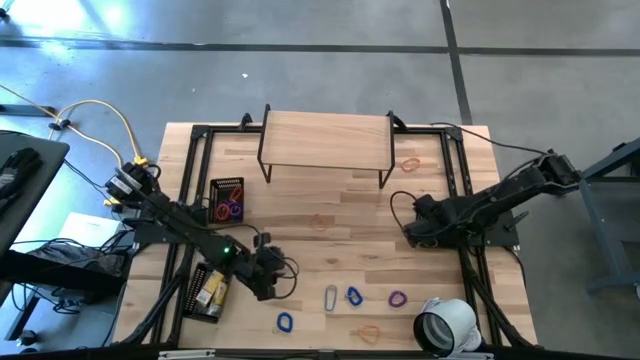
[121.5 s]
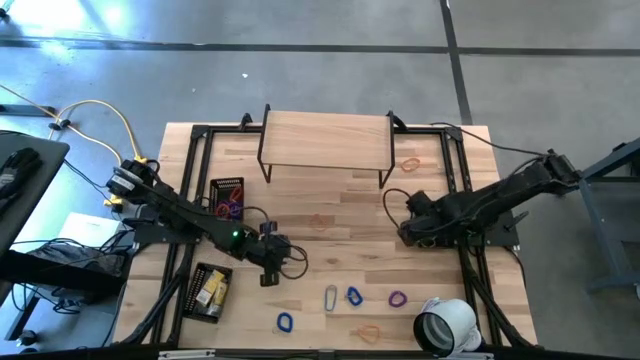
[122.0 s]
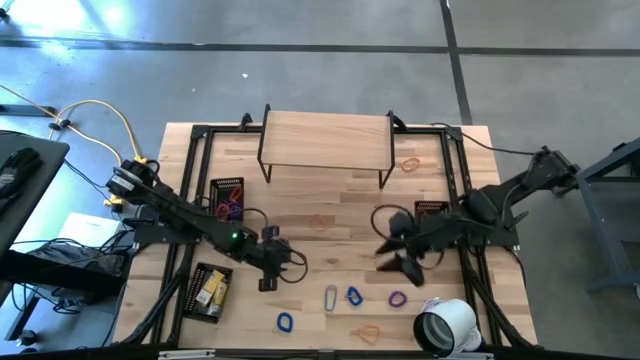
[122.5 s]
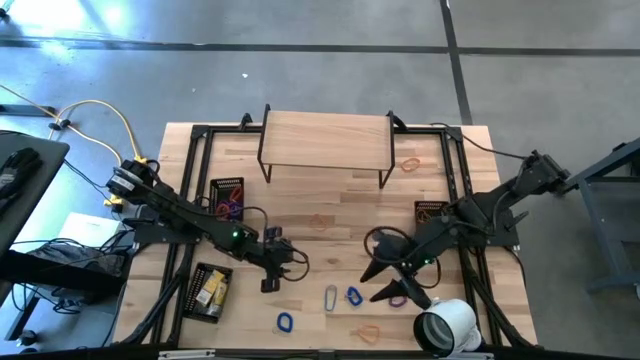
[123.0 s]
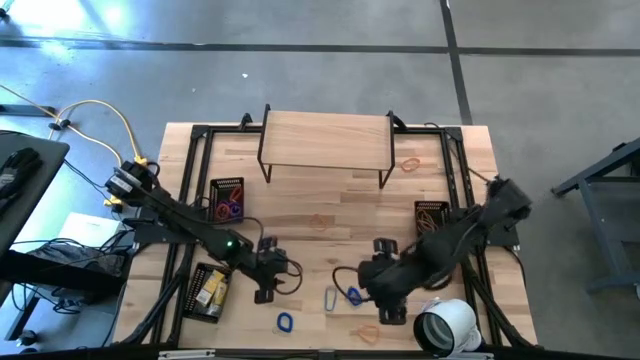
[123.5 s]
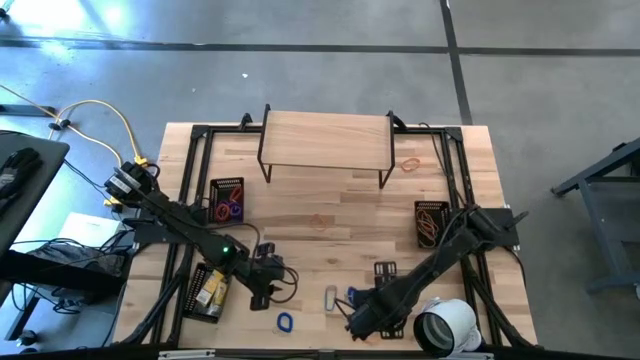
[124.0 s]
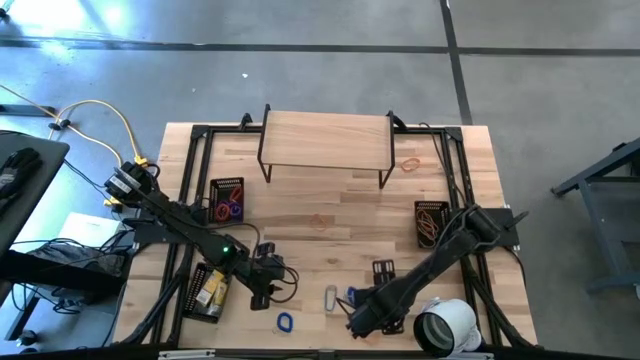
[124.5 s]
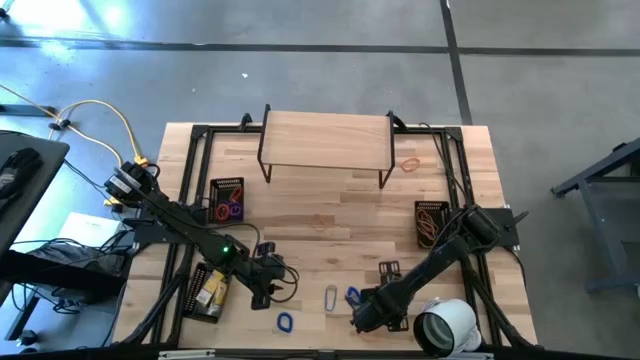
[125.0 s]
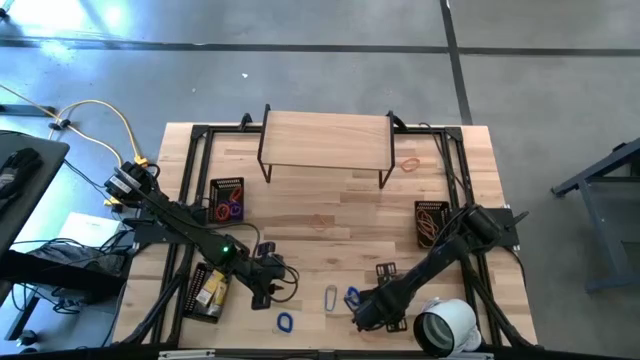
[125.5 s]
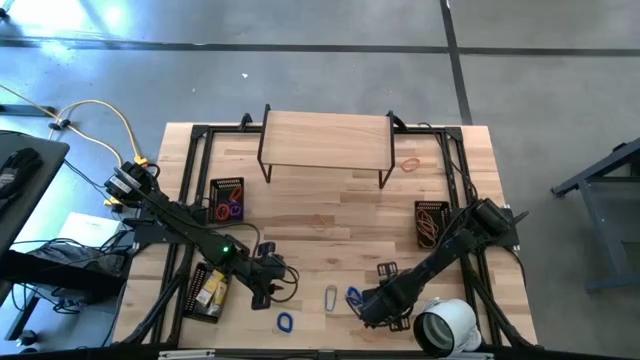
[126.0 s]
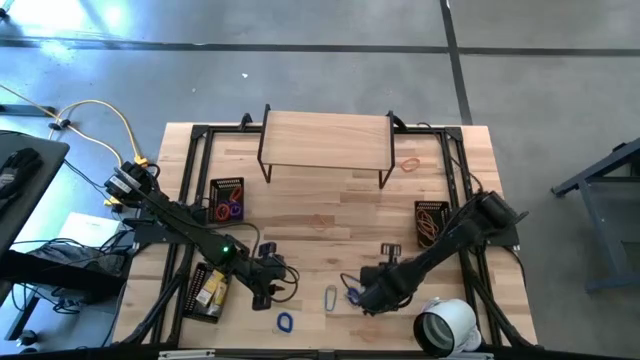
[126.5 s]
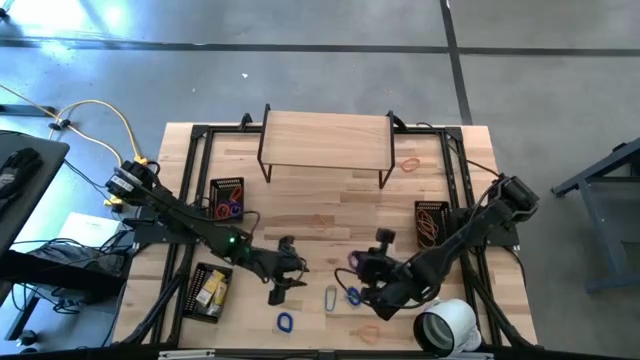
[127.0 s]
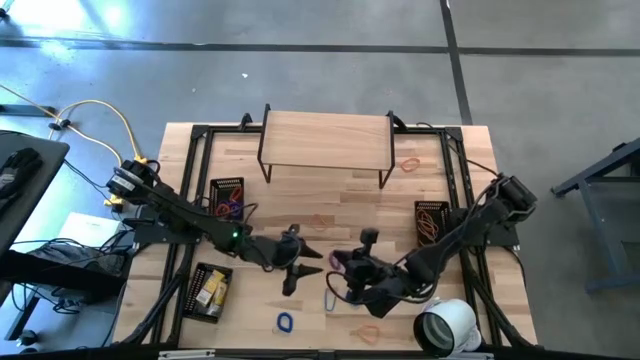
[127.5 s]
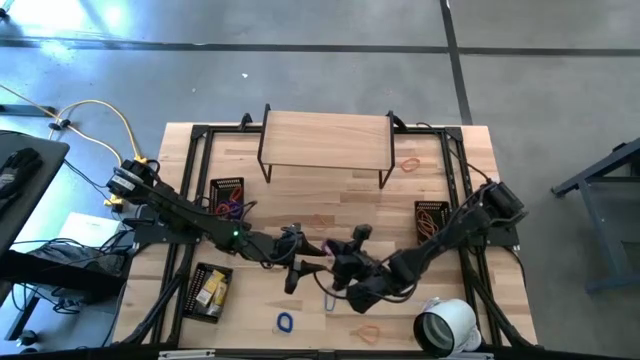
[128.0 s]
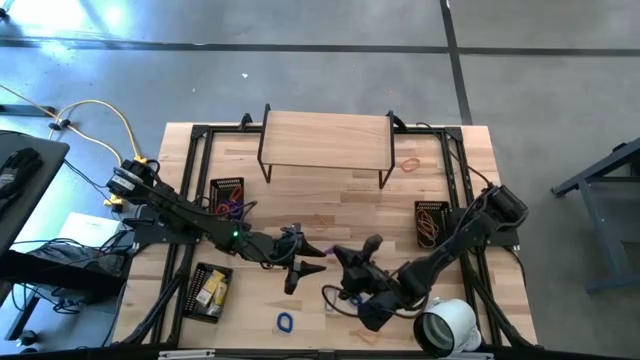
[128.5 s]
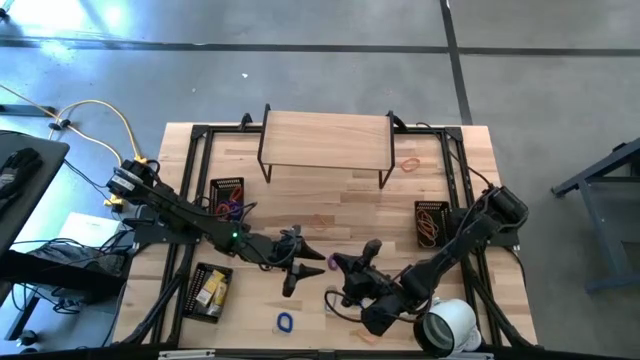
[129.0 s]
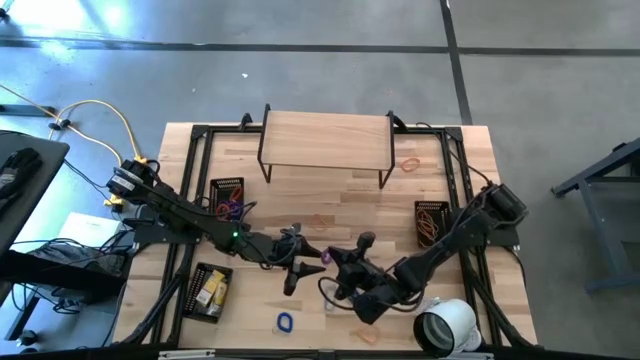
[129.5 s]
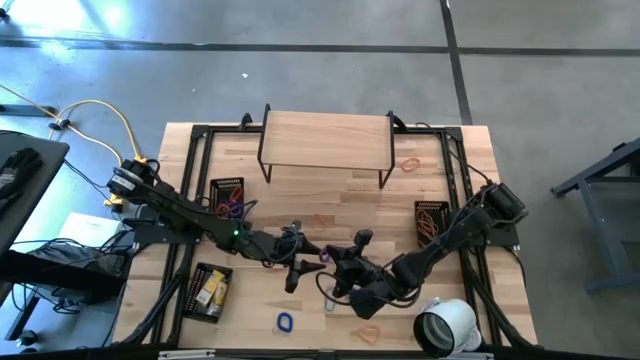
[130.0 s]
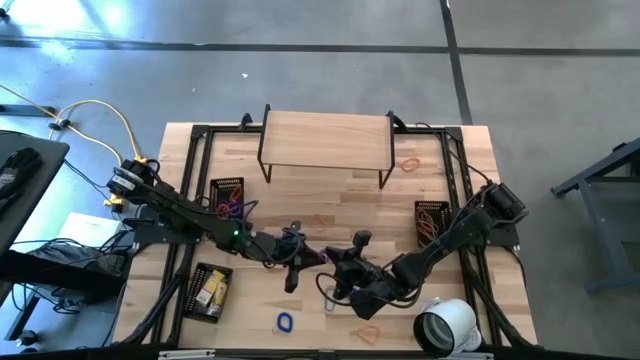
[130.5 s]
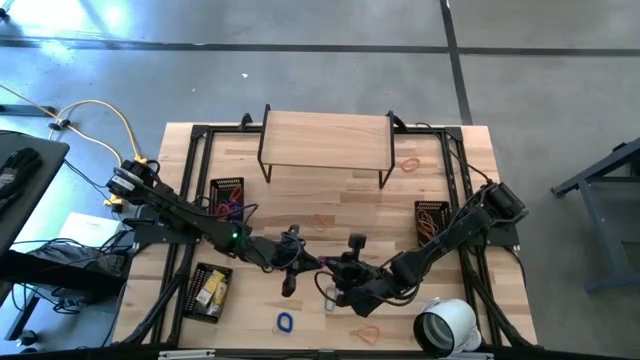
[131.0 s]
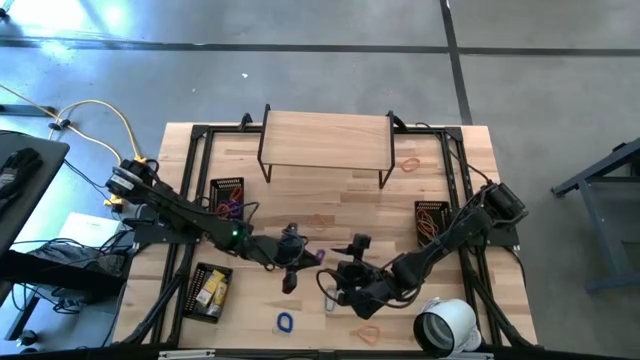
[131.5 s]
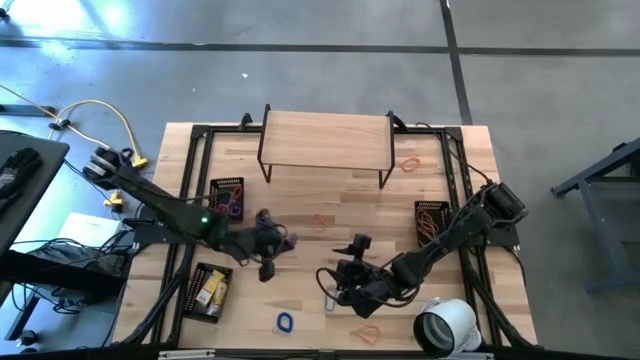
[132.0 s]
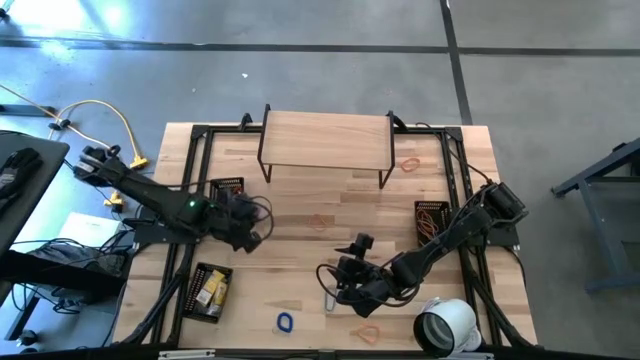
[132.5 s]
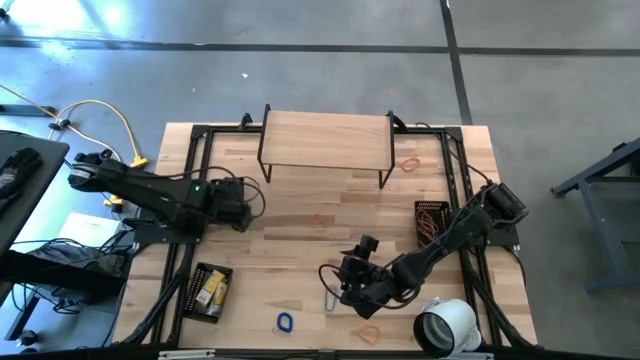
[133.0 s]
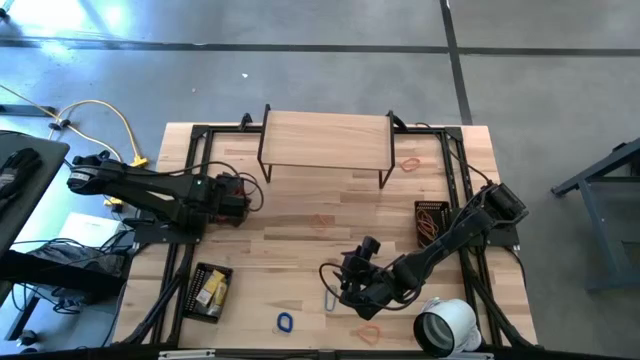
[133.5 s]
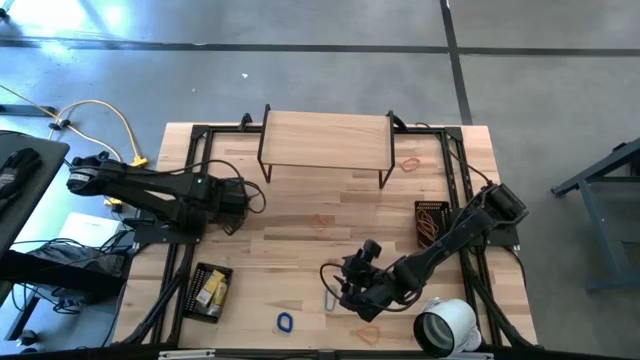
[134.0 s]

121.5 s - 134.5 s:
Task: Pick & Place Office Desk Supplies
Put the violet spring keychain into the top left black bin

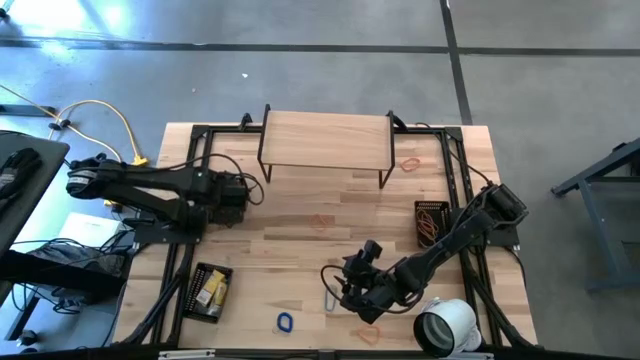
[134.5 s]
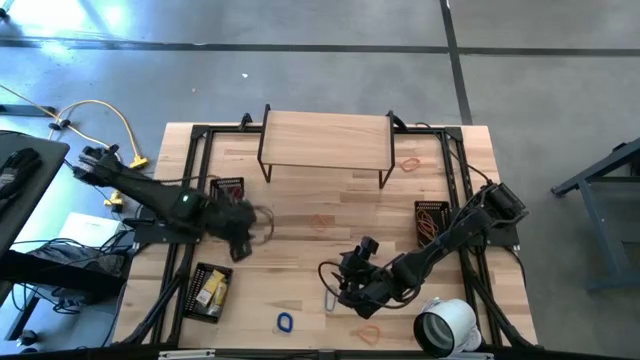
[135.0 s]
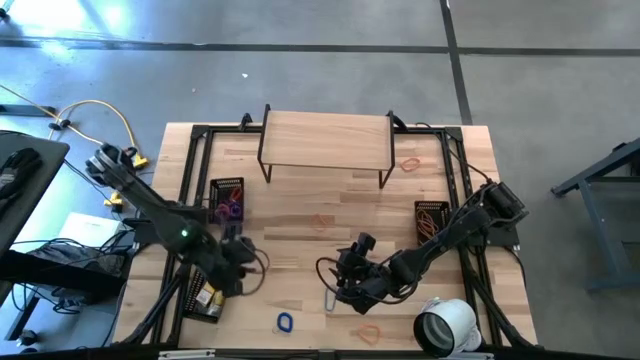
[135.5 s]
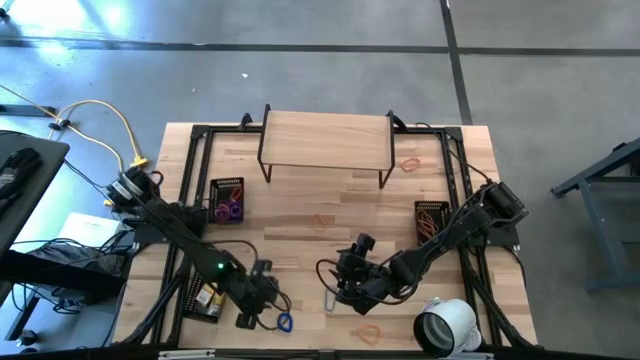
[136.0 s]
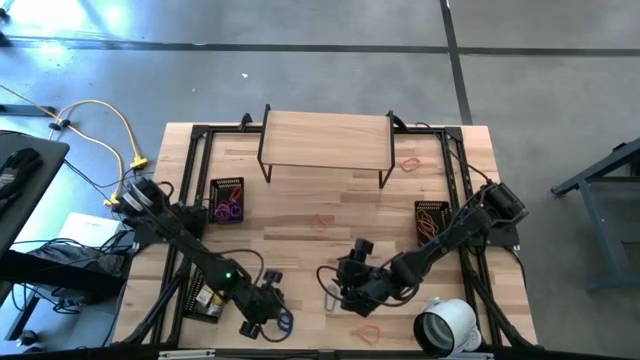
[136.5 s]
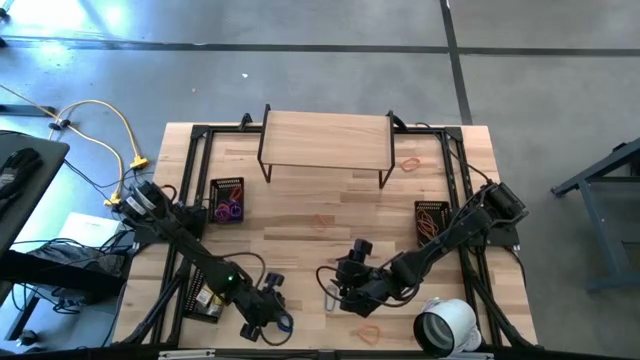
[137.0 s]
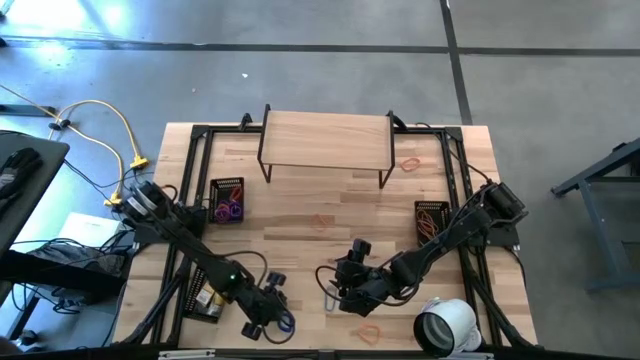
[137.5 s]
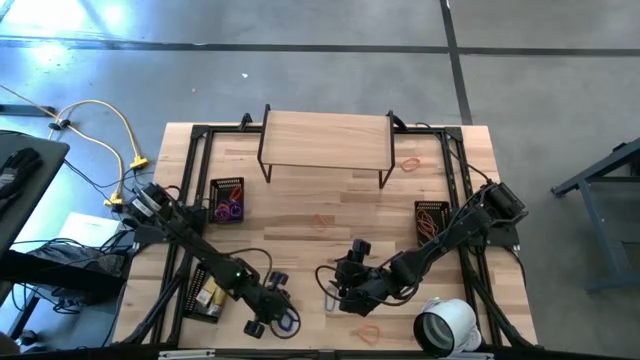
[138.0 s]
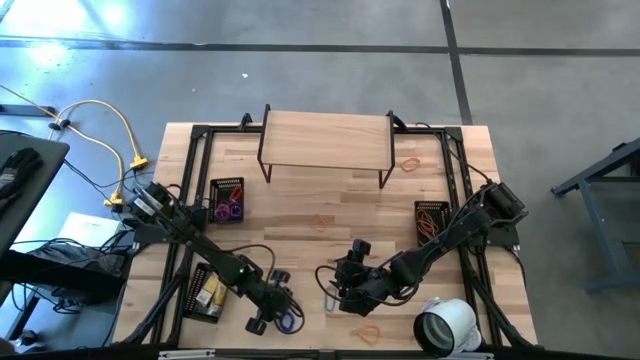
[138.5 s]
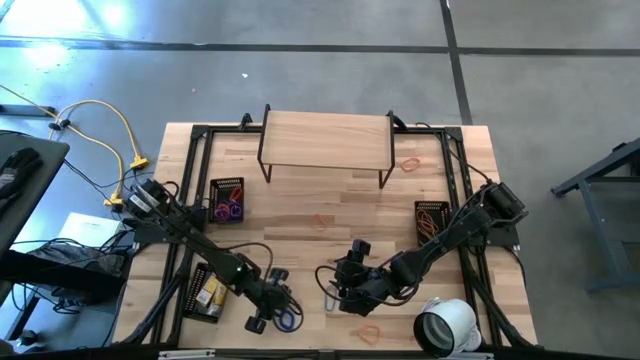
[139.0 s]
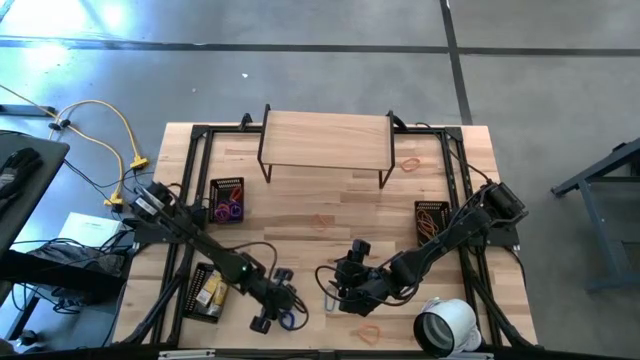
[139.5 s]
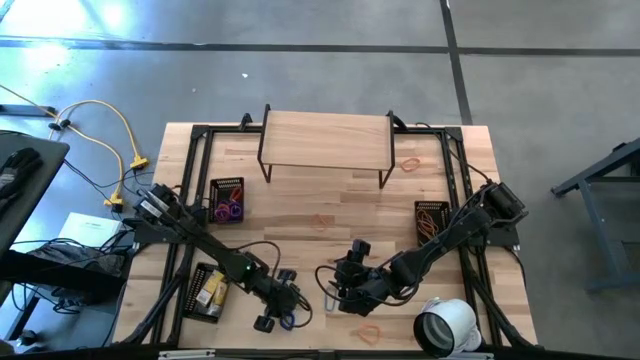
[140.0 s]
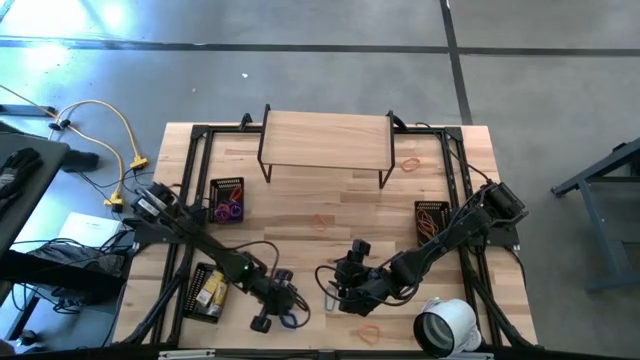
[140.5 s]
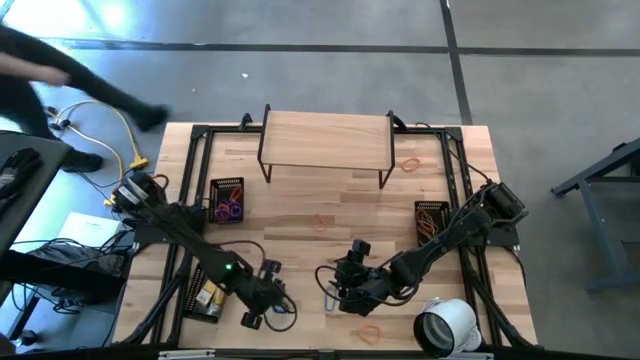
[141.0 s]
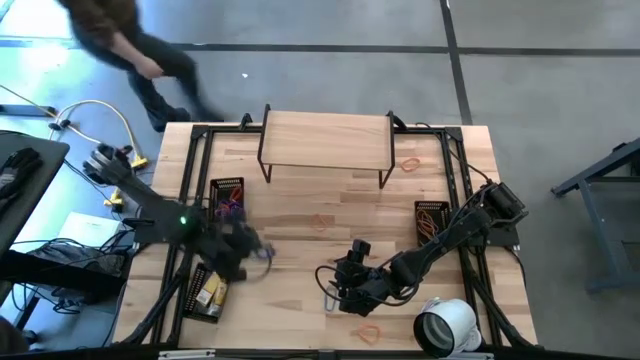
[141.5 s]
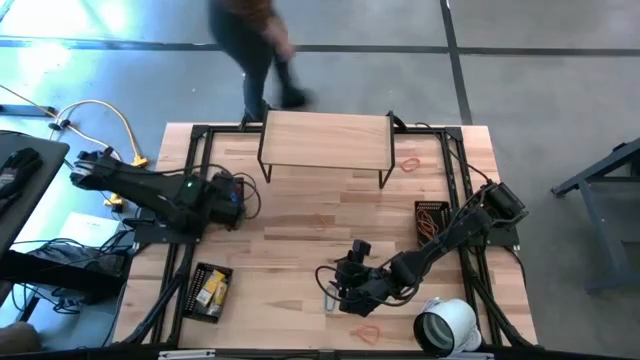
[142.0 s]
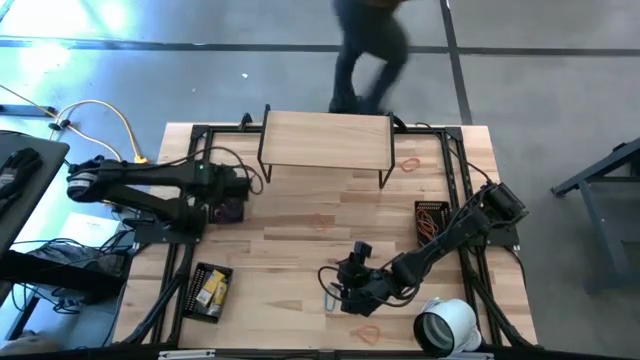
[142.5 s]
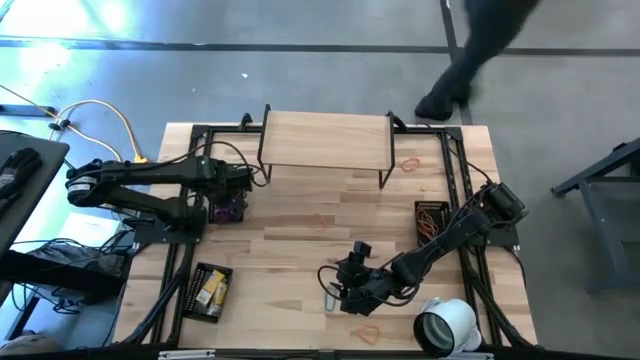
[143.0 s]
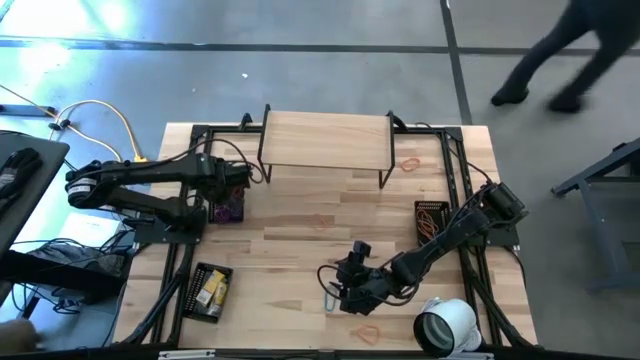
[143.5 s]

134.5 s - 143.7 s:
Put the right blue spring keychain into the top left black bin
